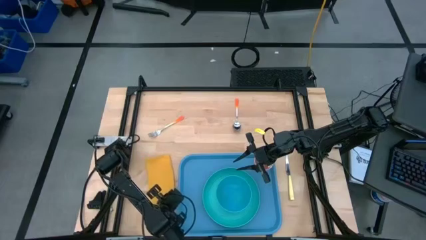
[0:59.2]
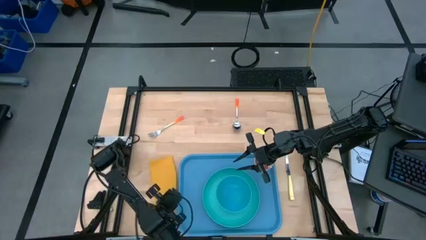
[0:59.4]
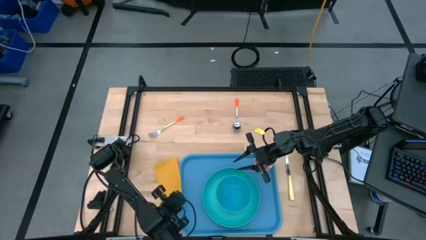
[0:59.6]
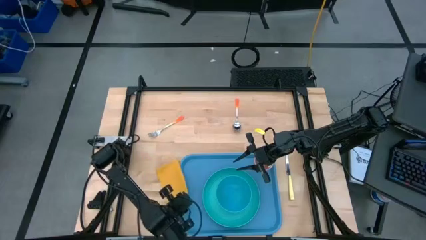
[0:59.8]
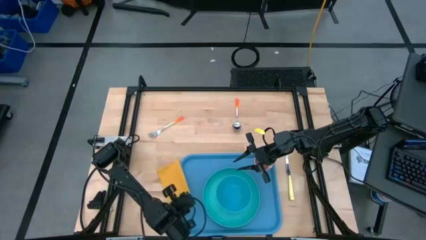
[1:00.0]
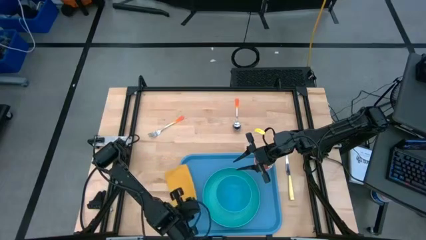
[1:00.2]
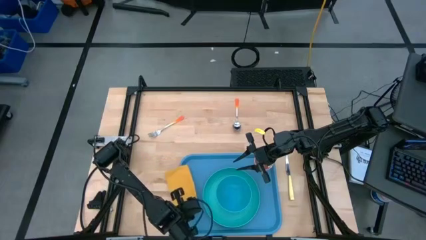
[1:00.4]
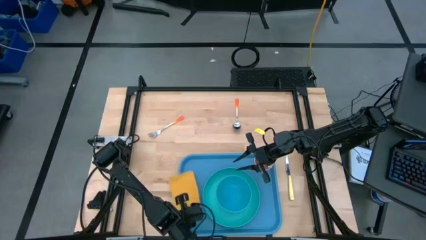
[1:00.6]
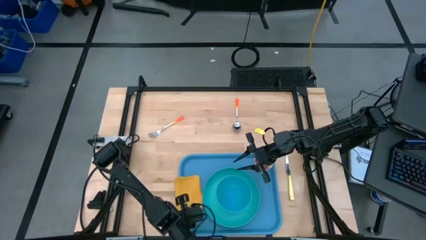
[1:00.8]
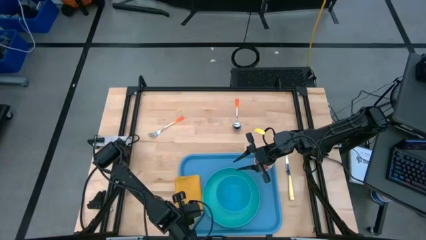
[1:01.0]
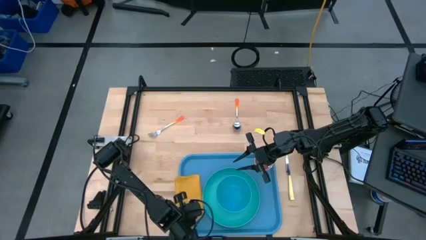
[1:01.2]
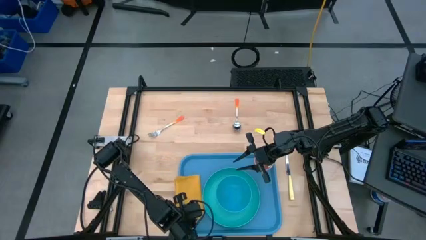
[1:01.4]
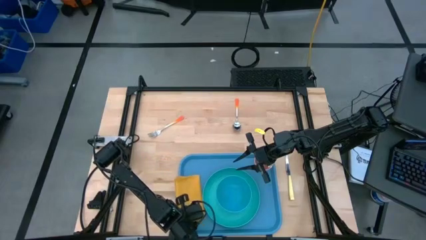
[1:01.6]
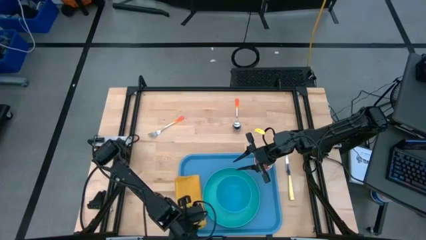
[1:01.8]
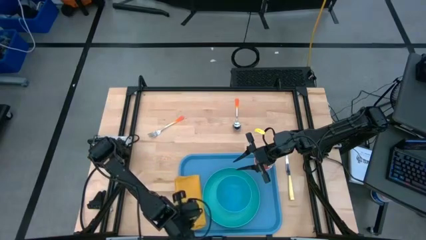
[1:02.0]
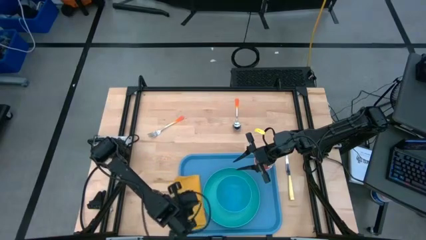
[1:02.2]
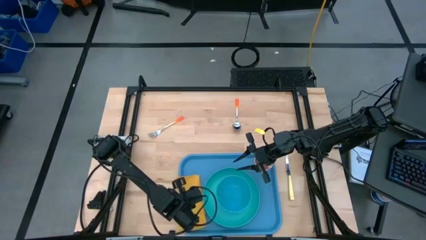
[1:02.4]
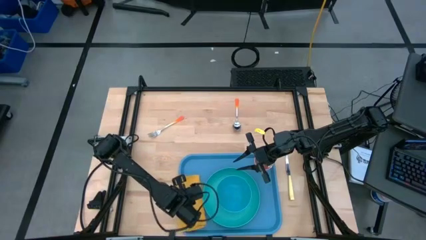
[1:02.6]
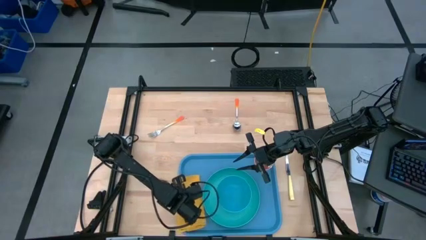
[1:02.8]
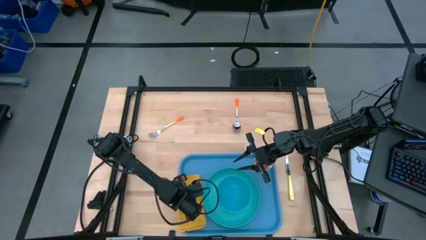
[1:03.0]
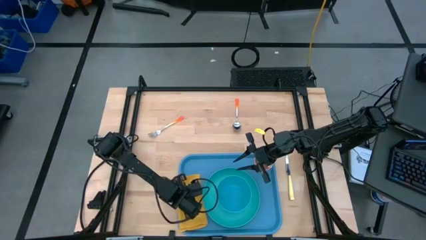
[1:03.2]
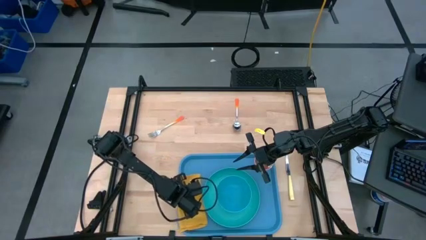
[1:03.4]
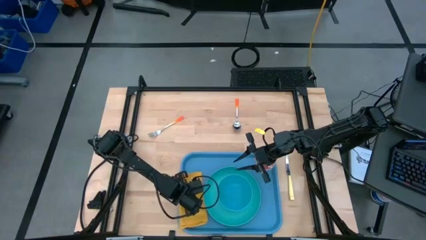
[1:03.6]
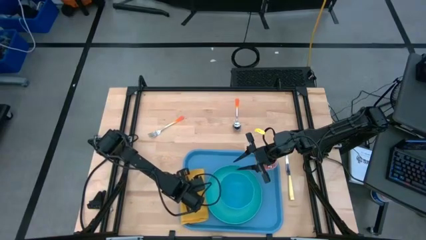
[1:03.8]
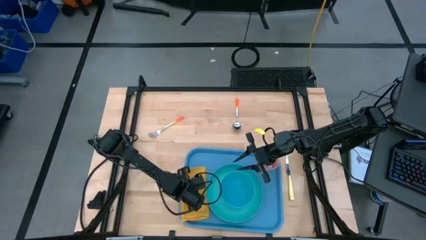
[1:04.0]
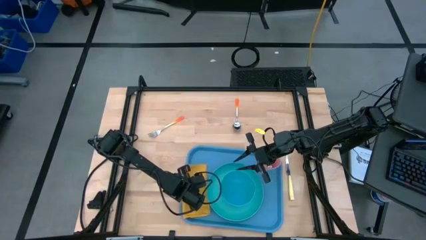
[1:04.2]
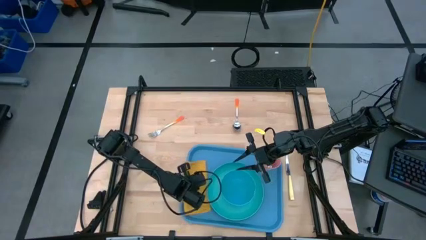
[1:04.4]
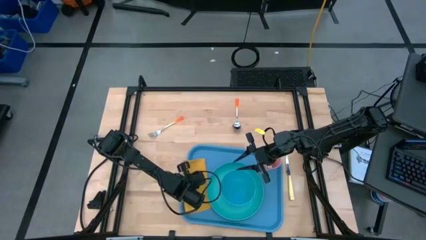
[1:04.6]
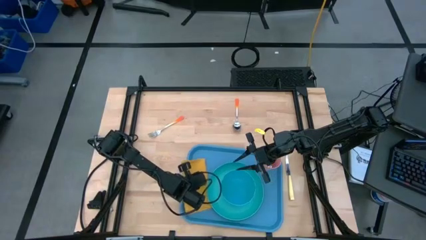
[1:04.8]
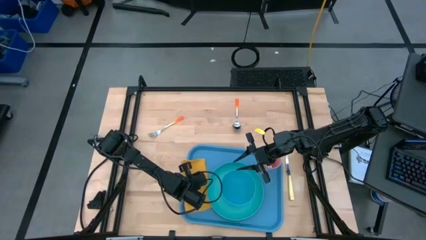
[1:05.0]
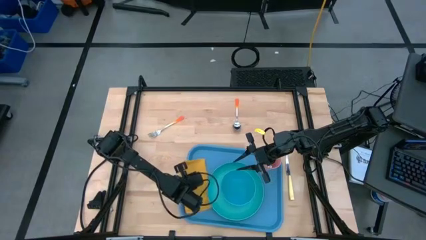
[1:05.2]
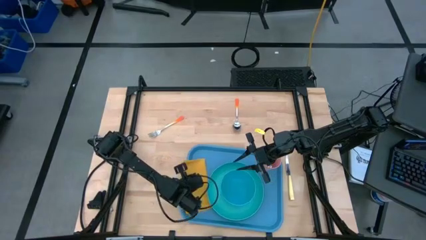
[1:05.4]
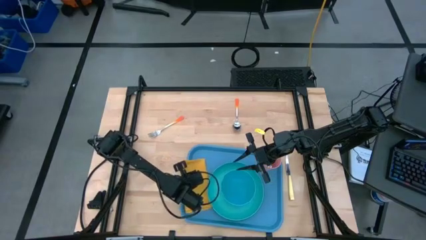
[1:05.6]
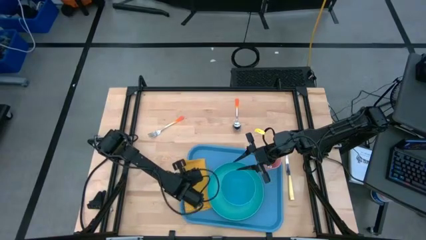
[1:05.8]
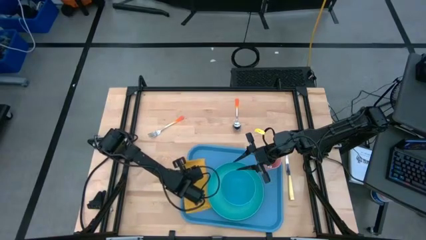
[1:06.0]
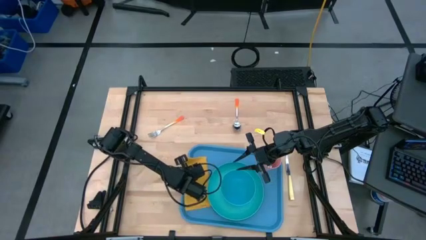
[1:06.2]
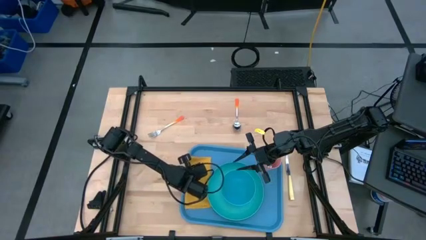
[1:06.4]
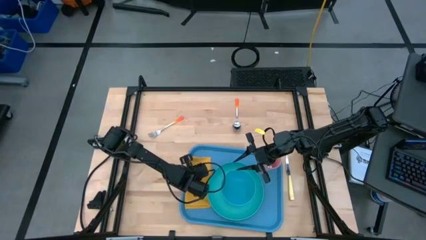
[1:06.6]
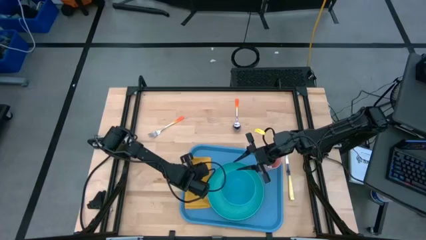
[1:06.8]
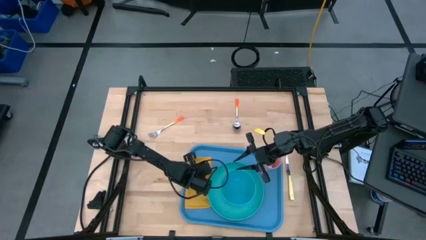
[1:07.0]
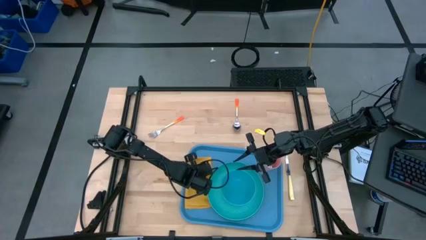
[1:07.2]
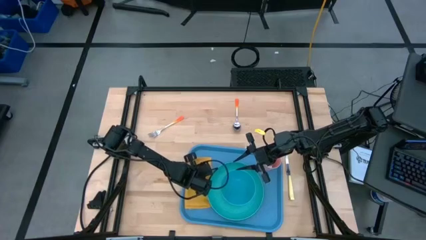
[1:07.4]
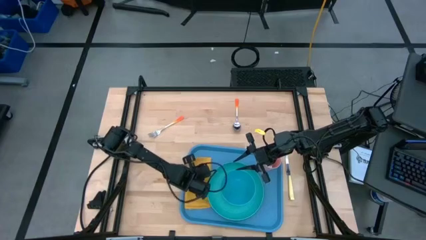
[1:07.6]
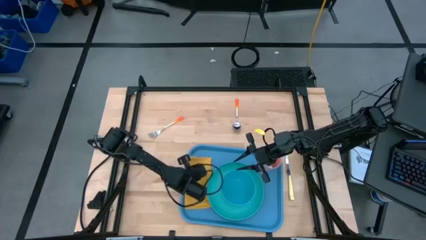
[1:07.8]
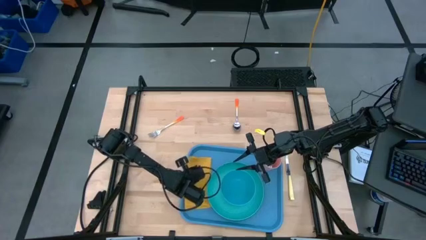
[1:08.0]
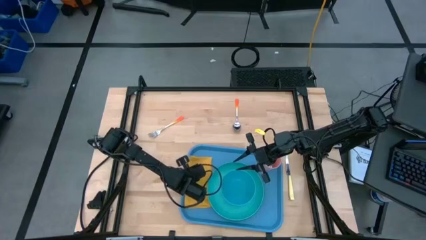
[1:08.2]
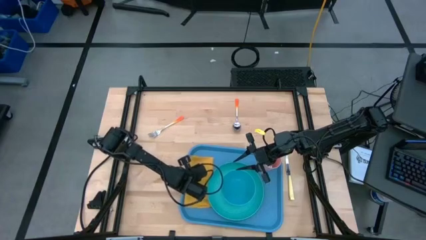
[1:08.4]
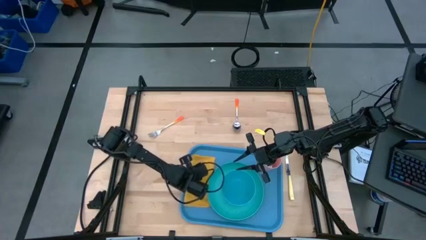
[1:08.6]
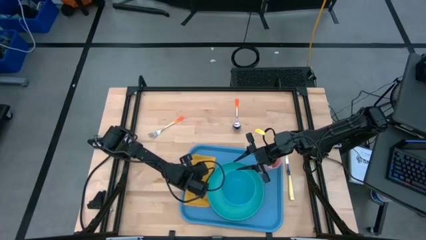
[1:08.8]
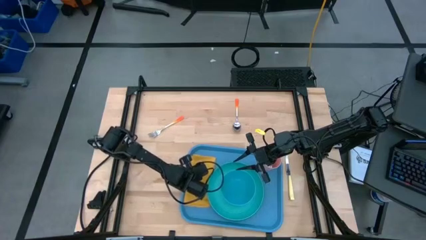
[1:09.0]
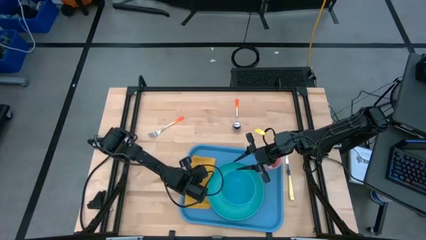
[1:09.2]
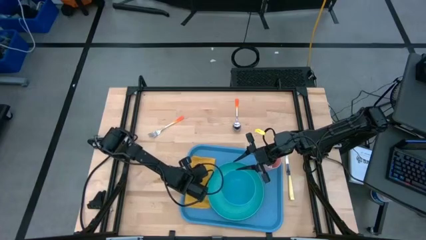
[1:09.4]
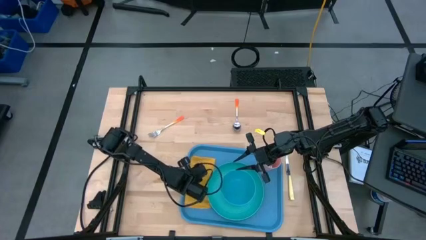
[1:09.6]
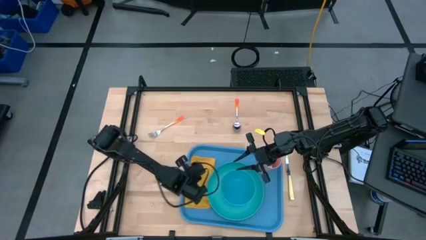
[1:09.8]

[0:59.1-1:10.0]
Task: Set up tray
Put the yellow napkin on the blue serving tray to the right of the light blue plate

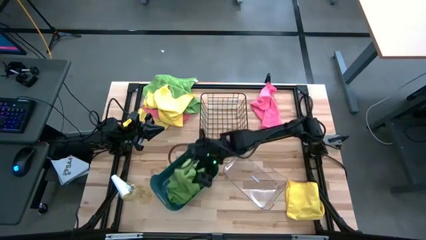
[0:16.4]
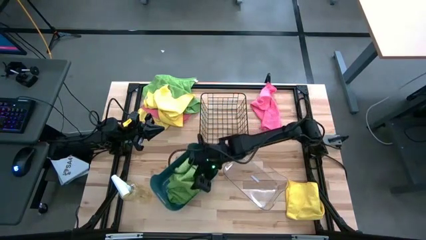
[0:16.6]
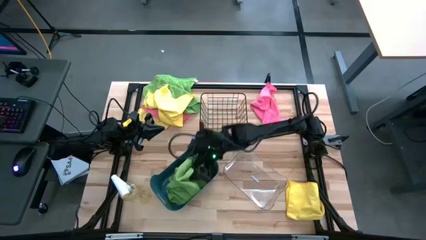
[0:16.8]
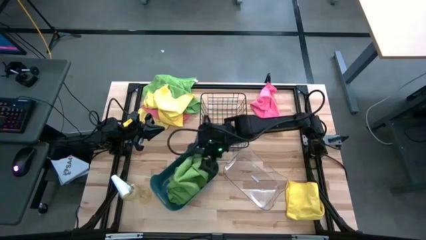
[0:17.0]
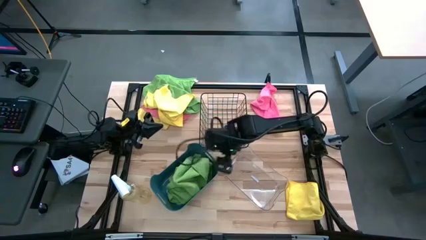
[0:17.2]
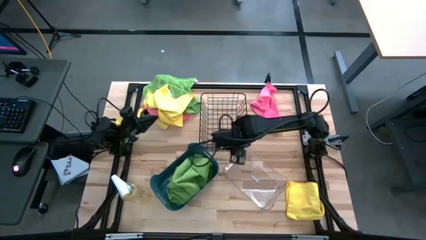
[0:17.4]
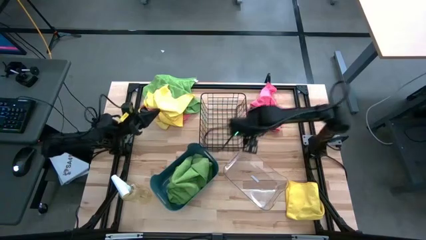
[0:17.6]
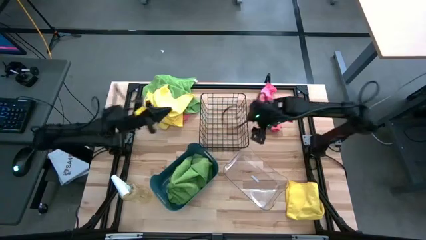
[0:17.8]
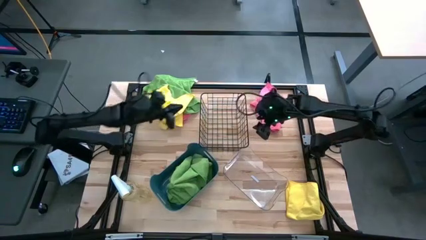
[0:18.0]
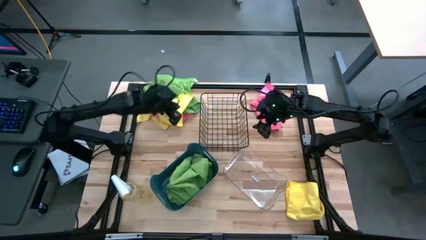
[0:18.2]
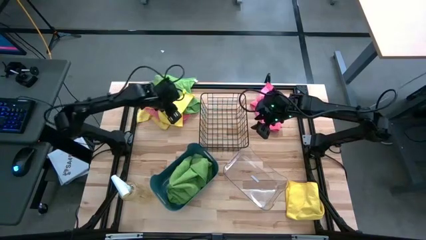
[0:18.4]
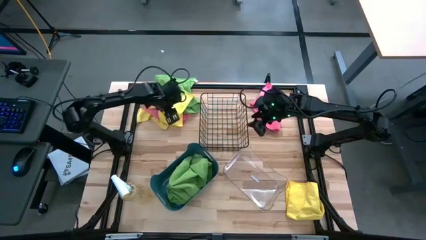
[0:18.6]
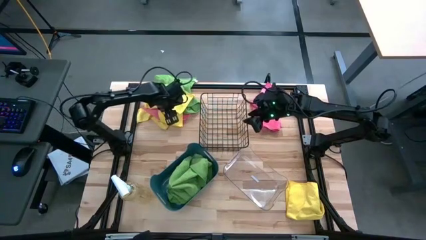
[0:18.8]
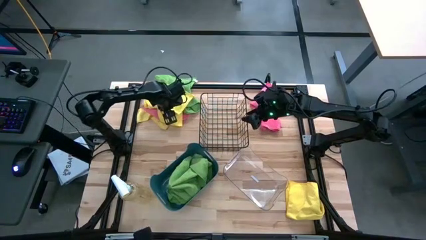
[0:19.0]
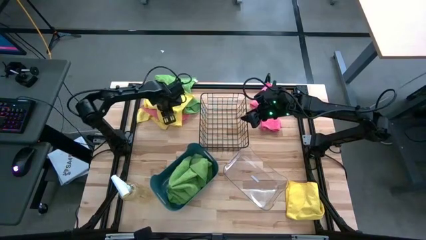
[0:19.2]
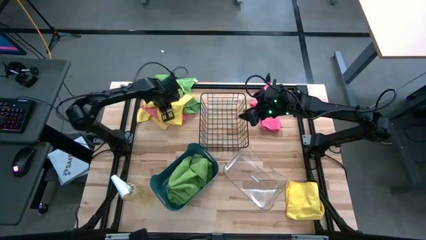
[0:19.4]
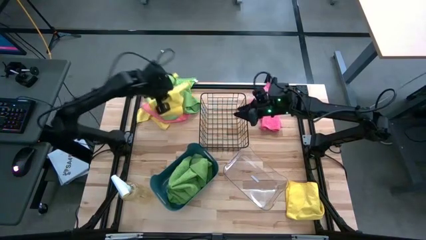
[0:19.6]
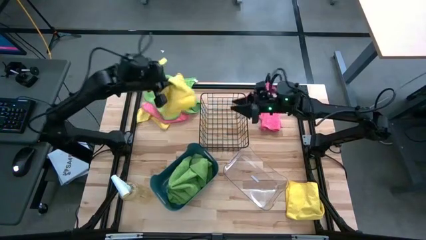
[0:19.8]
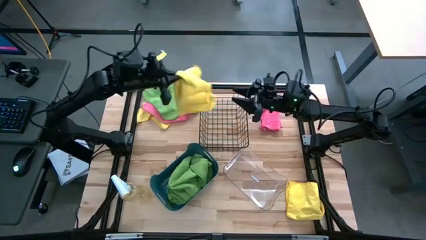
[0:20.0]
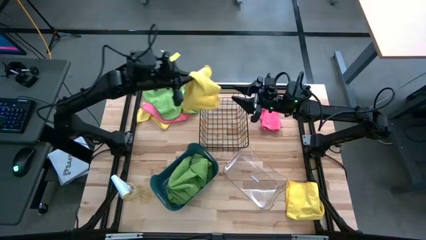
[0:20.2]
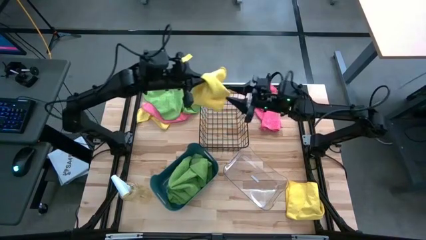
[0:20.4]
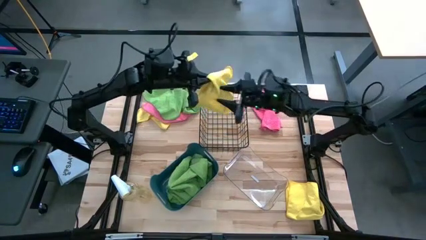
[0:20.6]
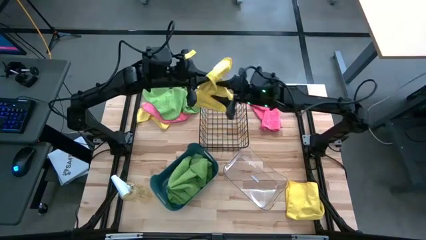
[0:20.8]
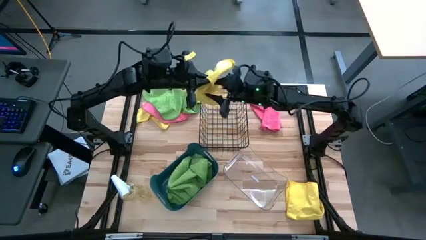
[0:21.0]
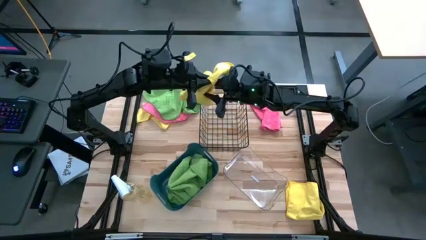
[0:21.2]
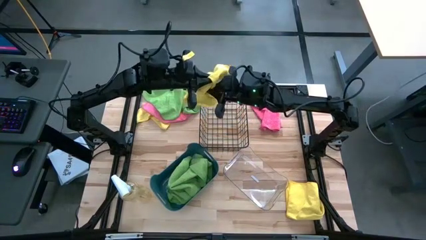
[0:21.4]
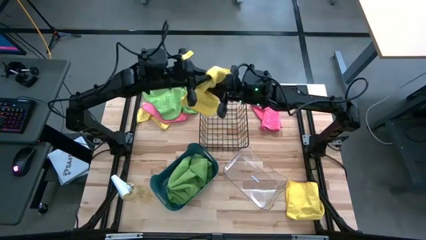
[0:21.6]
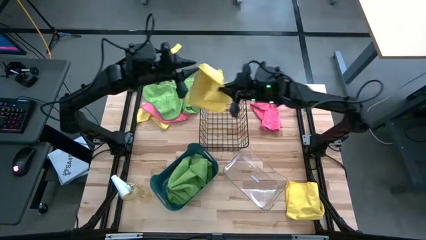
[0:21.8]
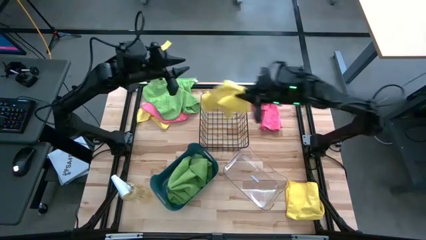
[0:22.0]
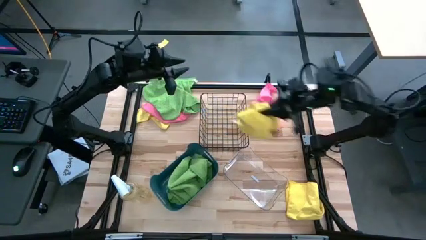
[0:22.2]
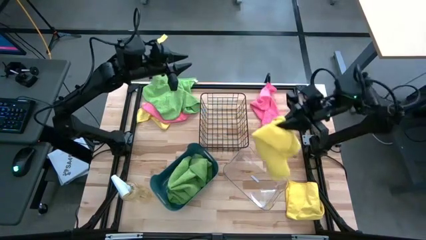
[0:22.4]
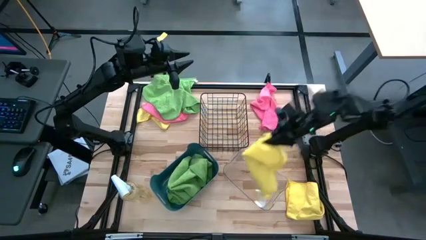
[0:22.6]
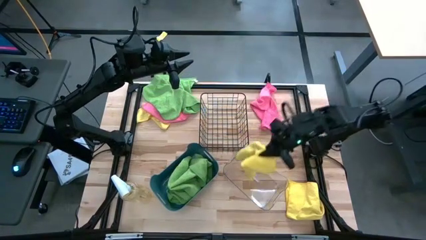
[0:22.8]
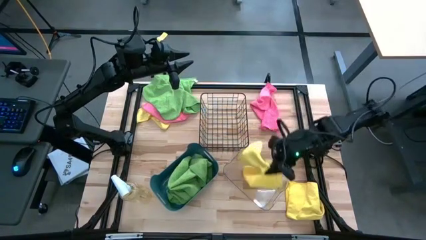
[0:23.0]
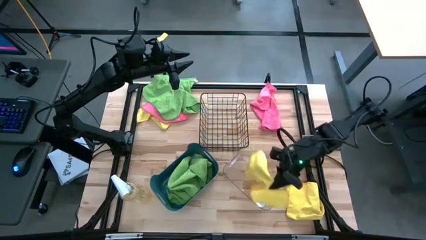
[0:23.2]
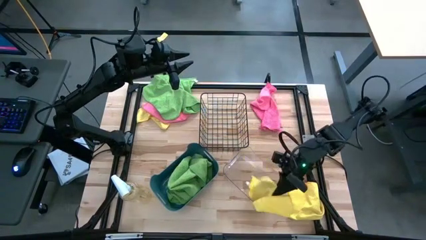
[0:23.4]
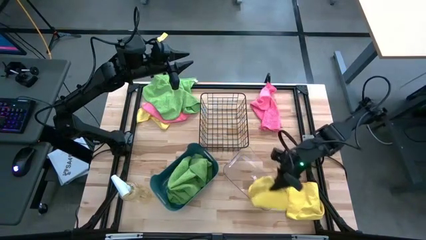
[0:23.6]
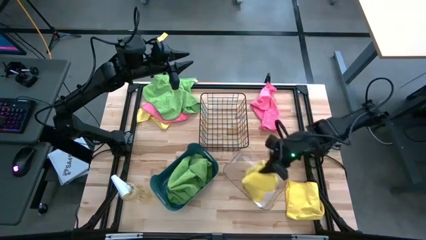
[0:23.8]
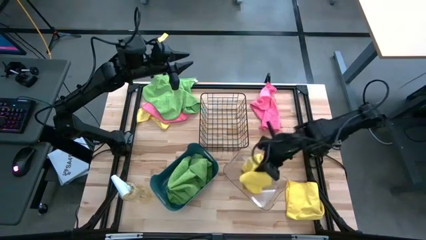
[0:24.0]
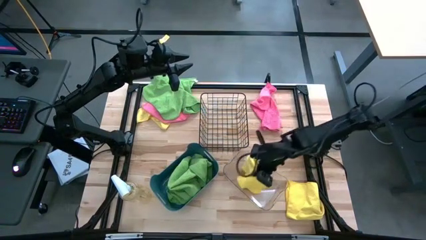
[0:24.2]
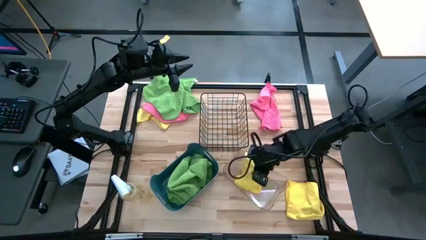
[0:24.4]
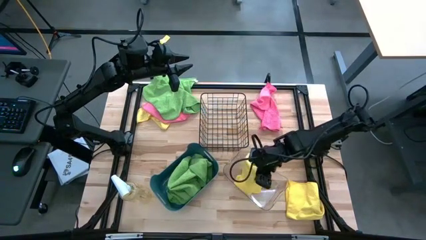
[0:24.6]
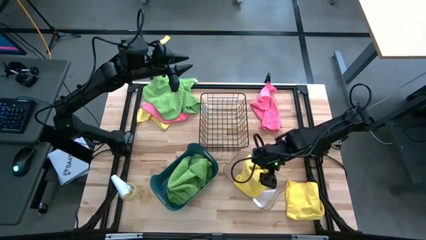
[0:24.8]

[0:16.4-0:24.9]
Task: Sort microfiber towel by color & place in baskets
Put the top left yellow towel into the transparent bin
